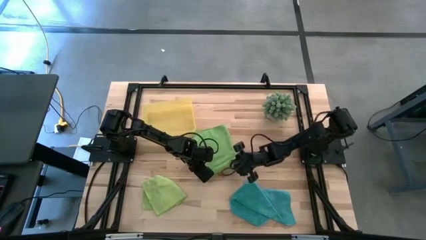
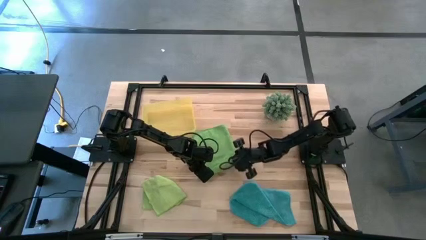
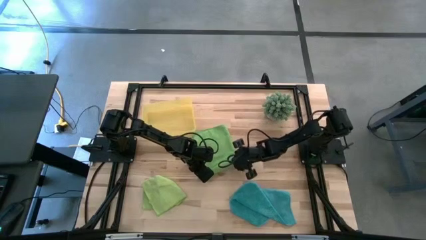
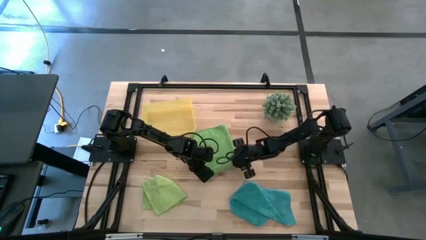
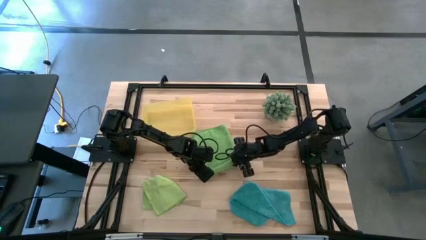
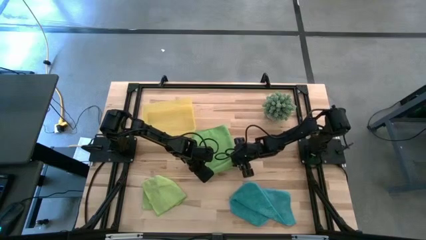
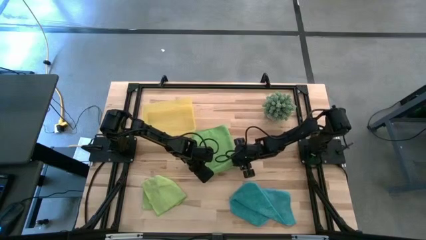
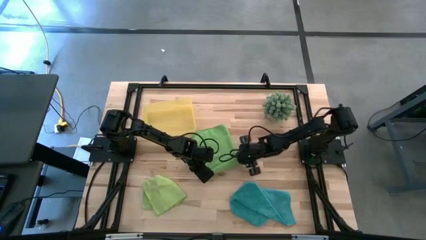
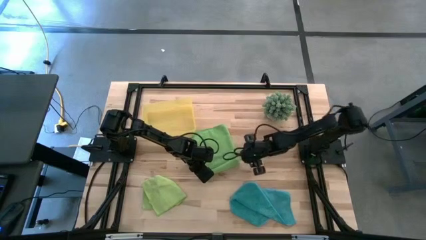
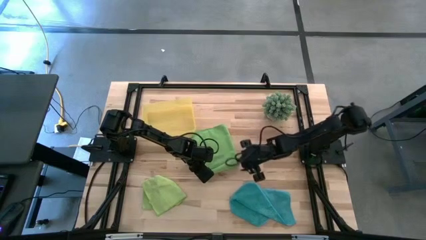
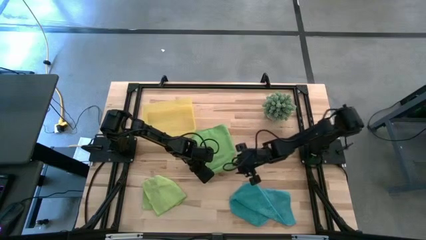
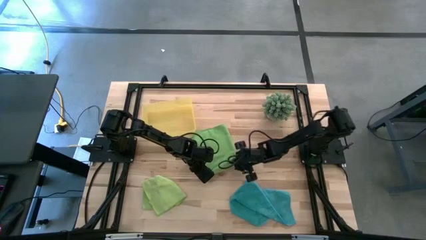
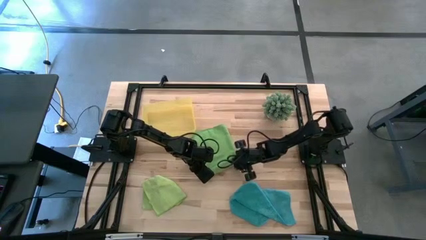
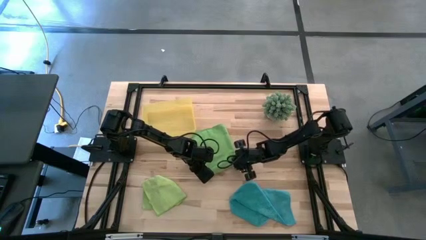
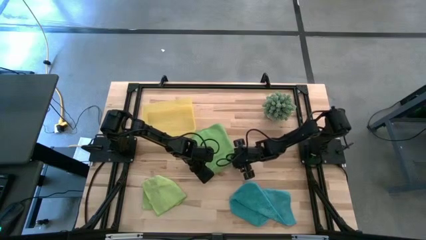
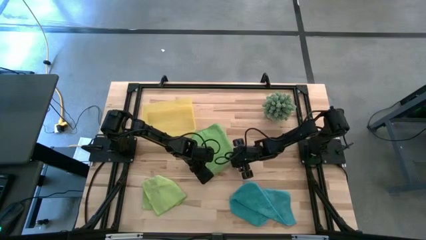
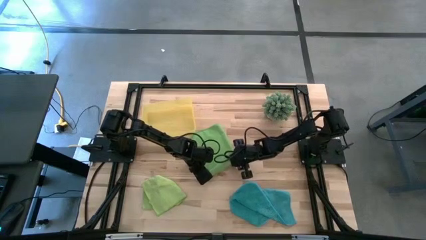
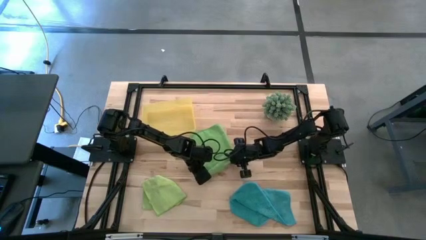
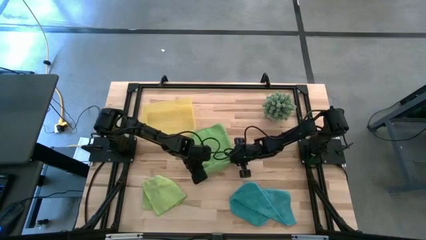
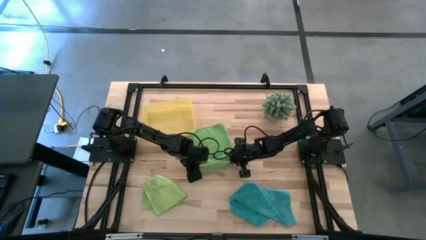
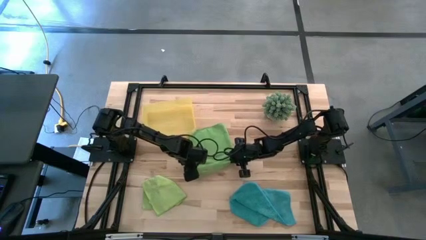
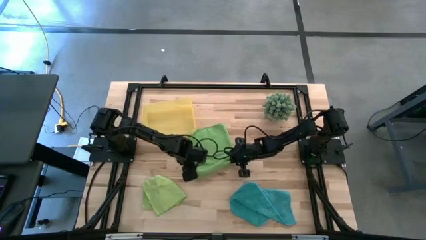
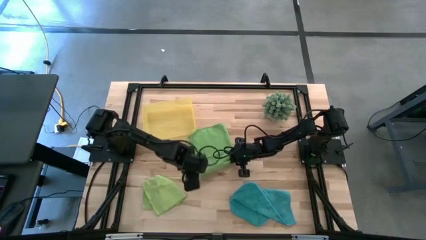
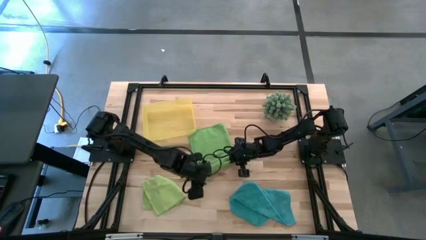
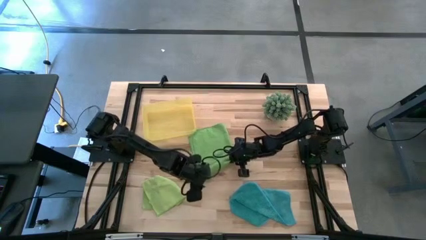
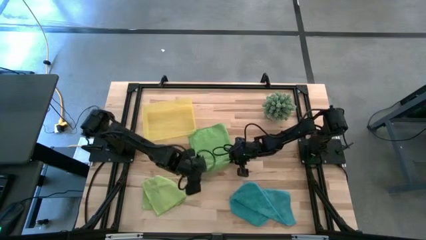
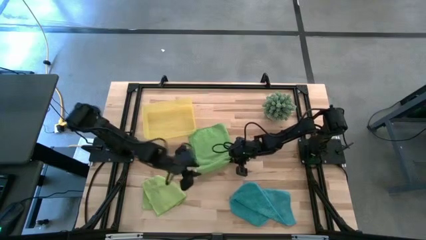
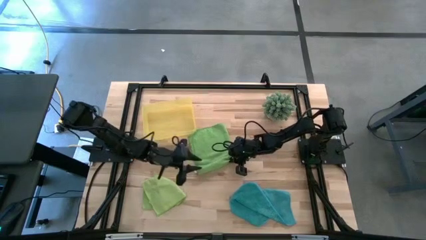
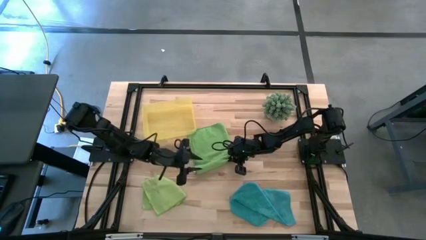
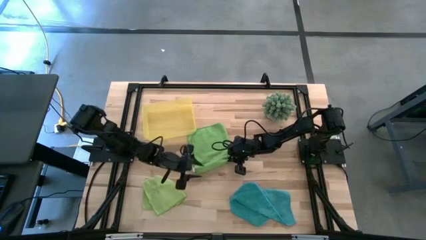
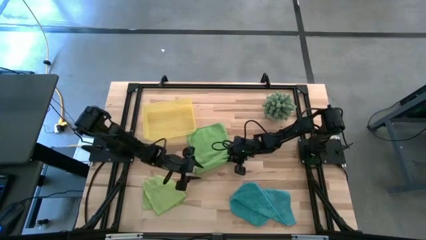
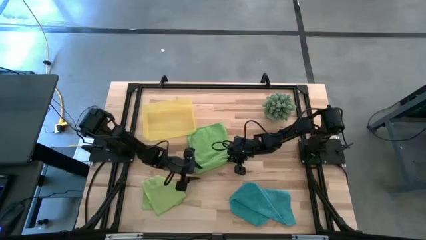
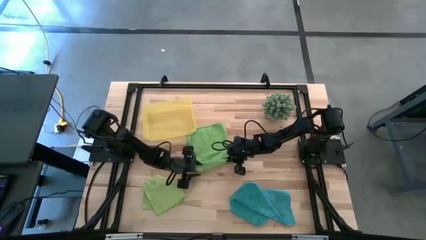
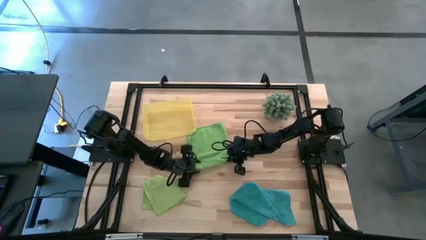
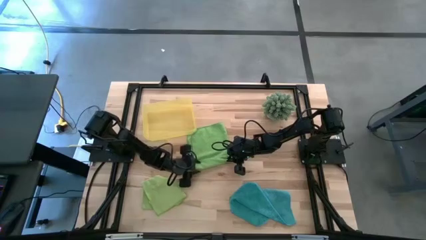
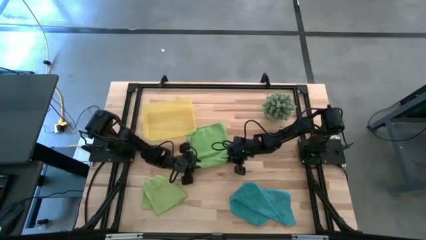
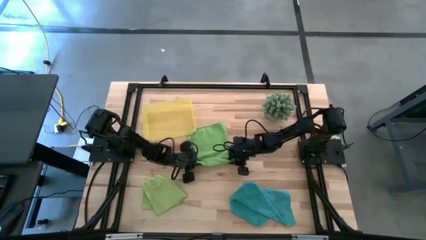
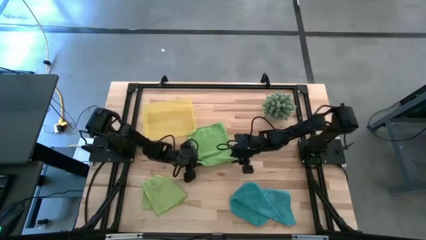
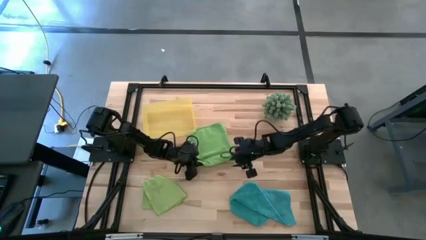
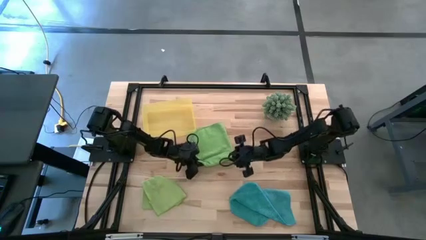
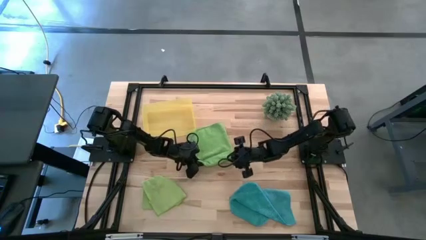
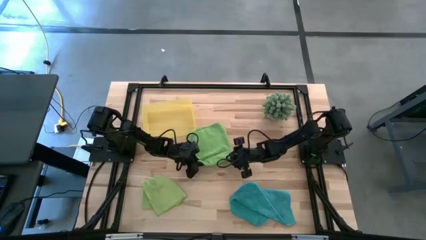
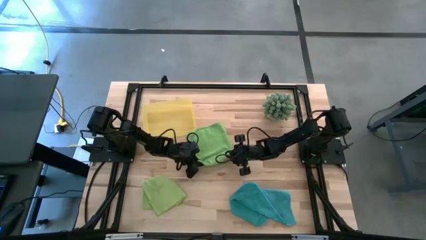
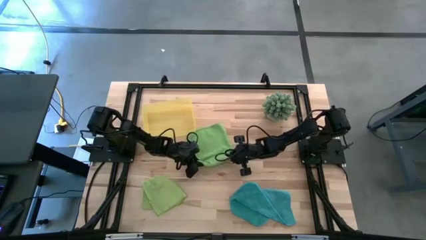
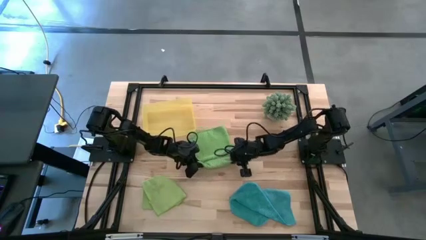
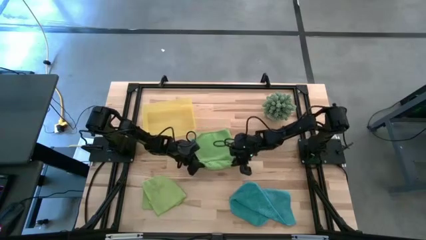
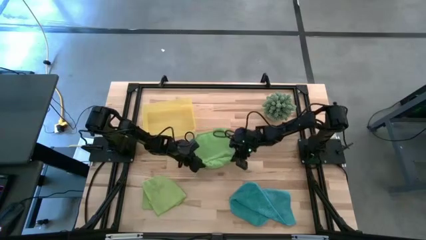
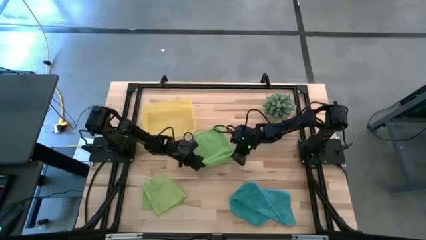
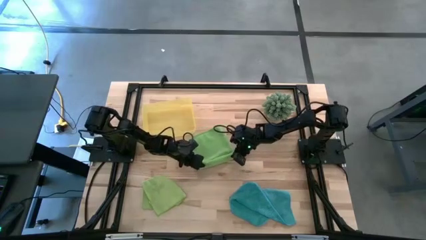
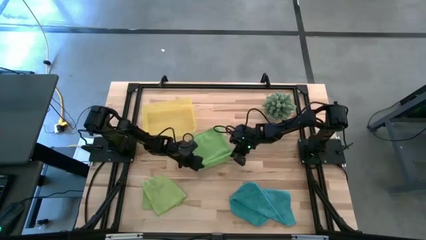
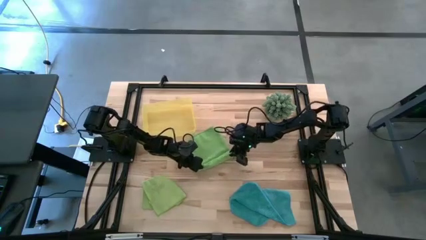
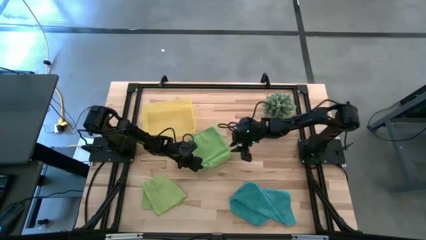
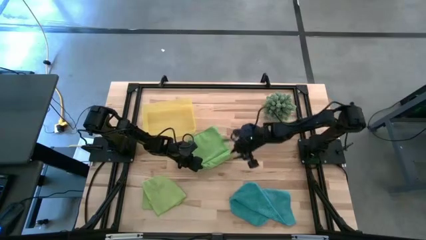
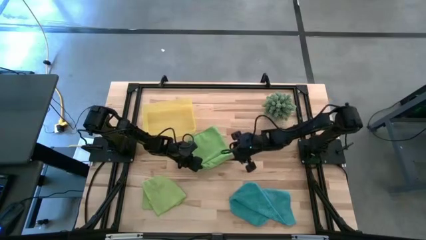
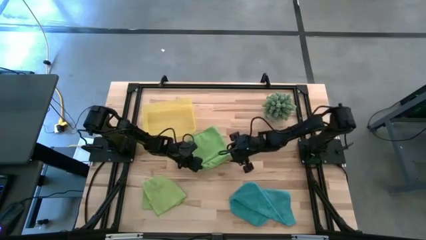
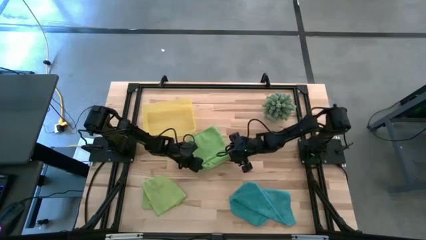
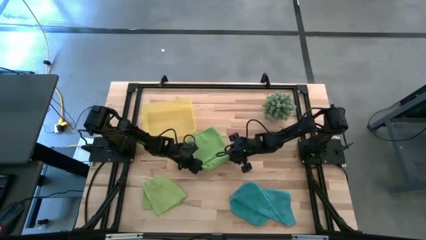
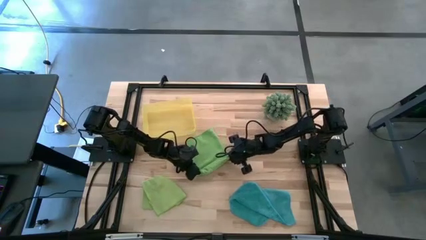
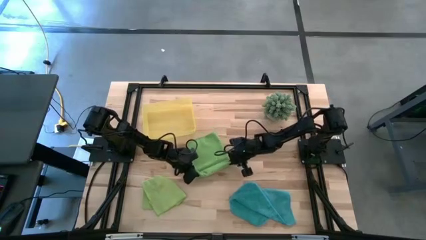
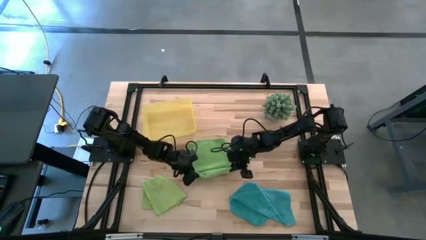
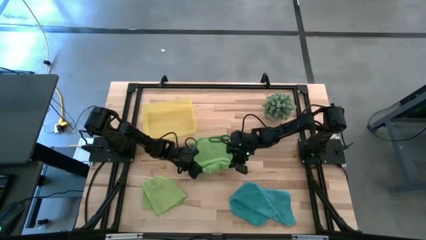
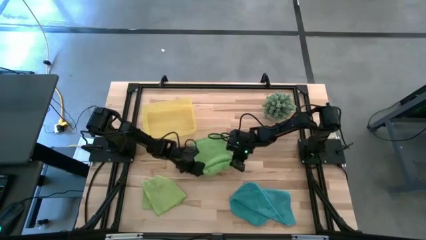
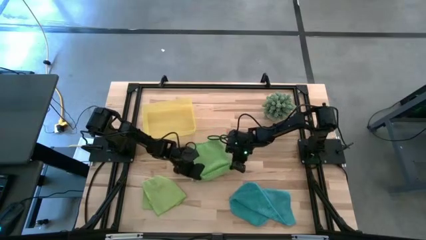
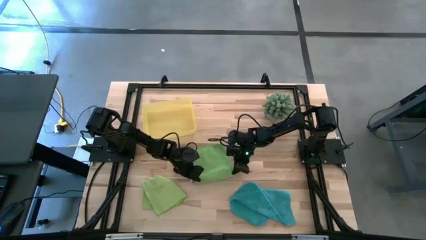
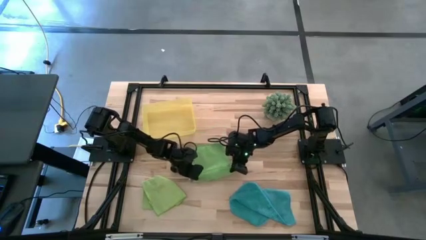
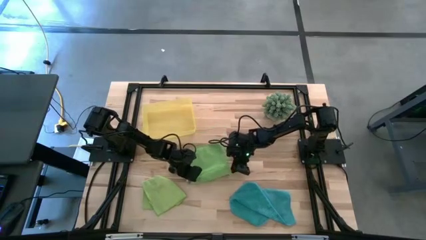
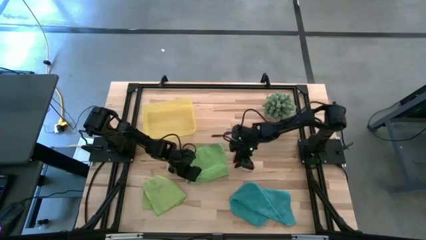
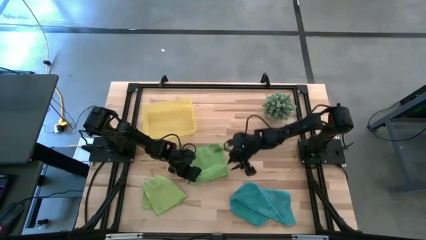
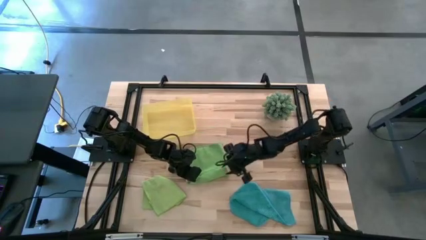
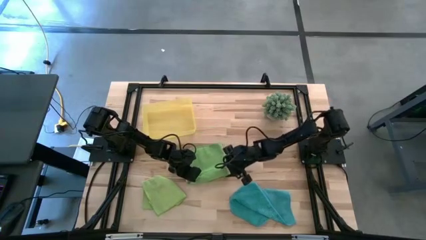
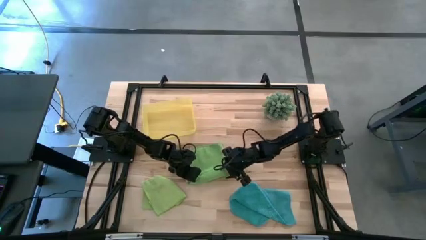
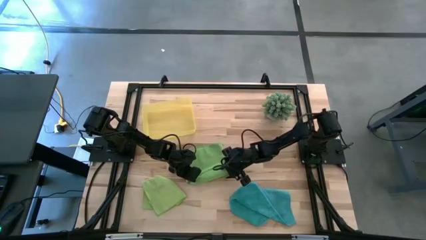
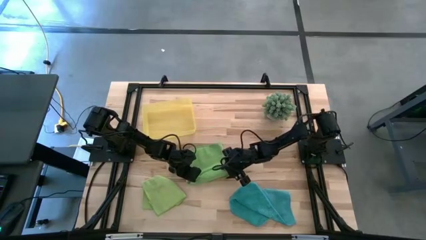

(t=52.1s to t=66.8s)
Task: Roll microfiber towels into tight, uniform cylinder then place into a basket
Roll the green microfiber towel
